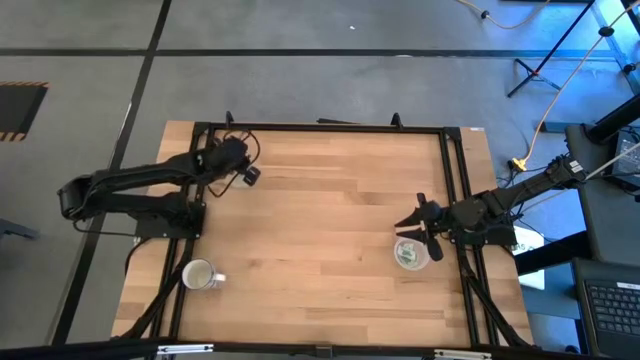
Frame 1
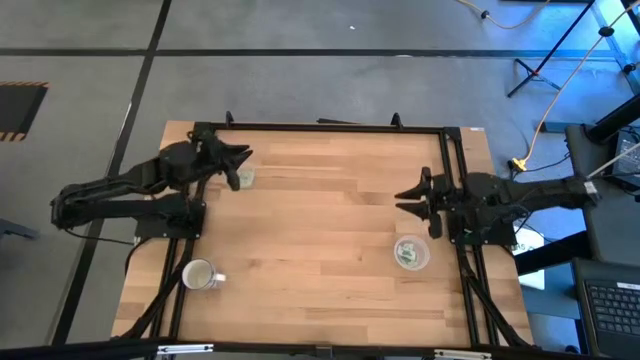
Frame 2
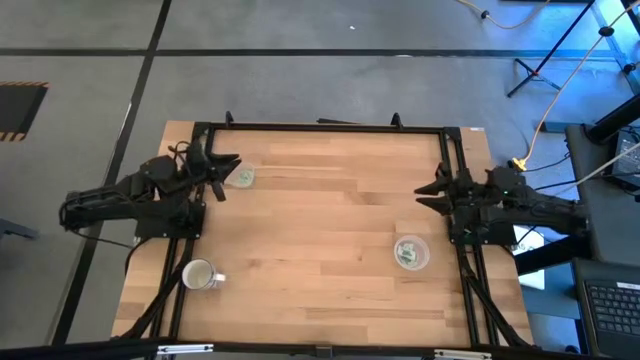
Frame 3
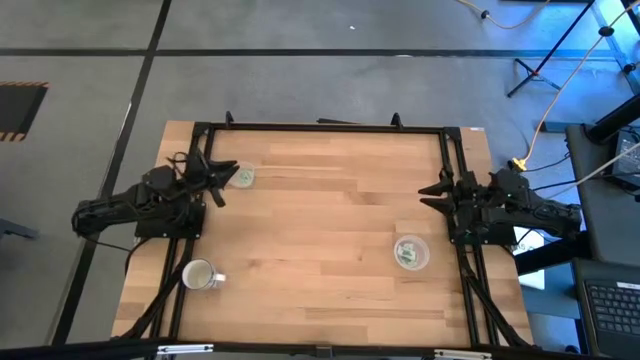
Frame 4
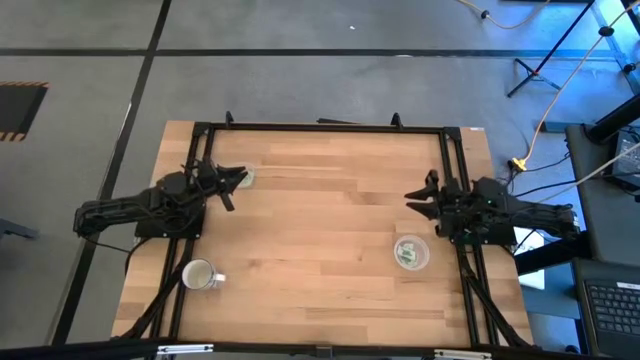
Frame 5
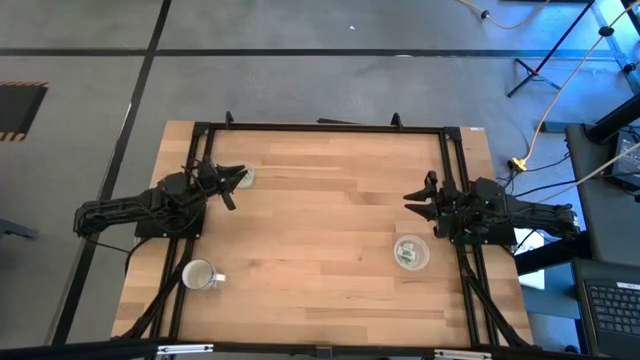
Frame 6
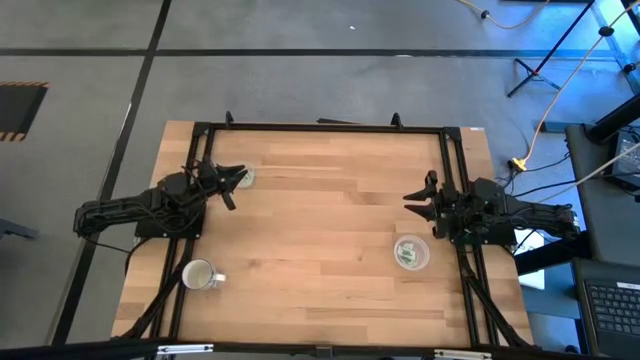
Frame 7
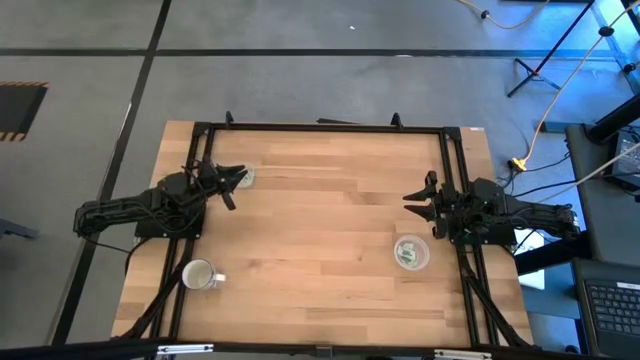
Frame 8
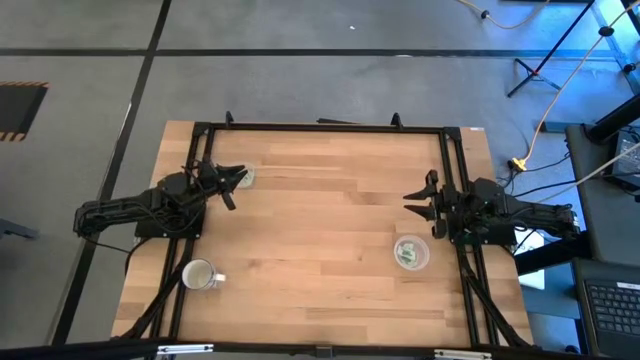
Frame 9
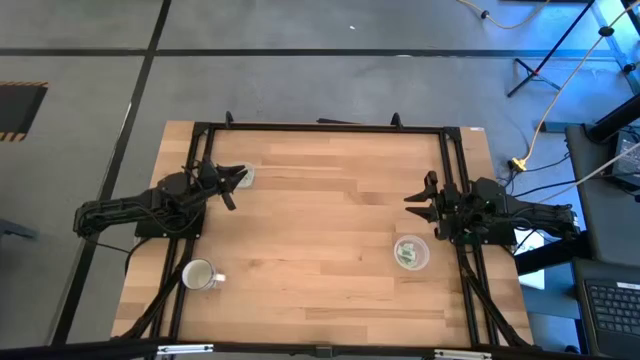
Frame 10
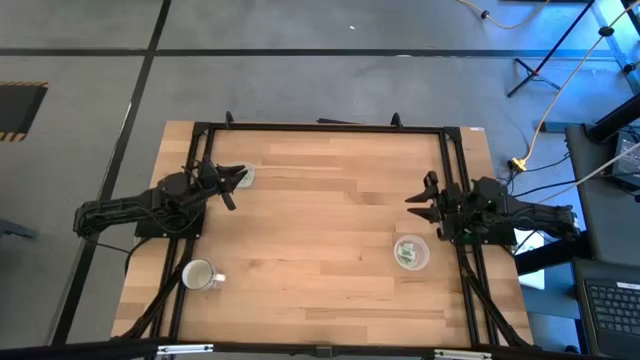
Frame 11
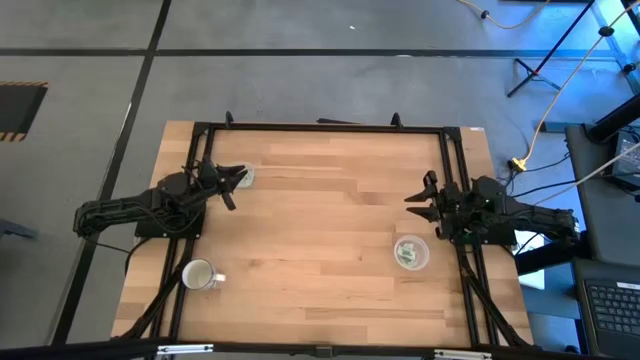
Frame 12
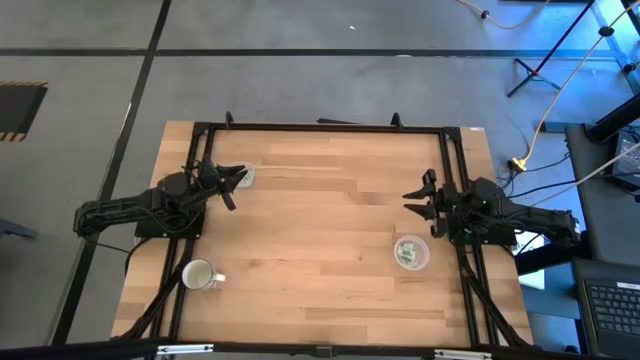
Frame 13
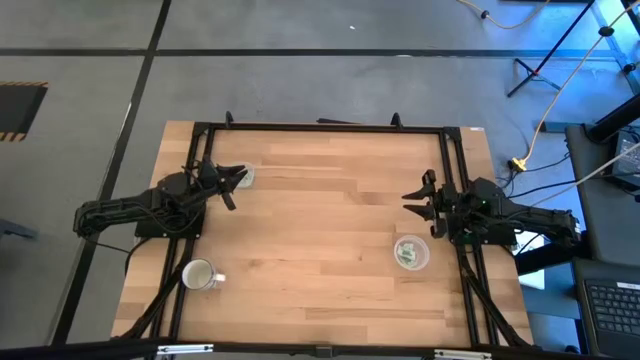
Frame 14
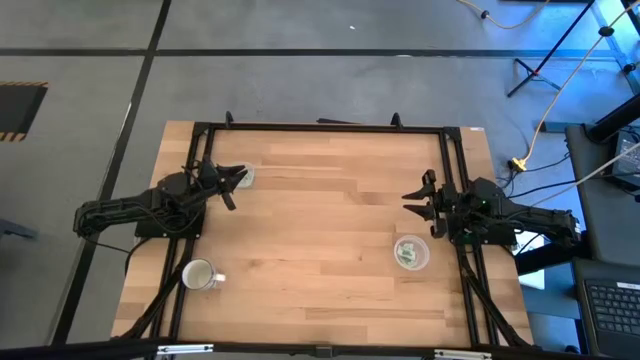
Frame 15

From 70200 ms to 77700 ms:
Task: Pick and place Stevia / Truvia into bins
Return to Home Position

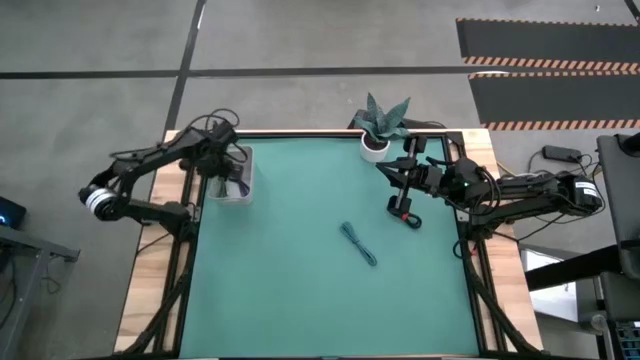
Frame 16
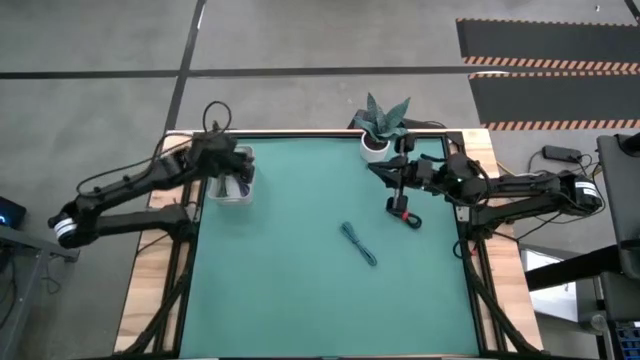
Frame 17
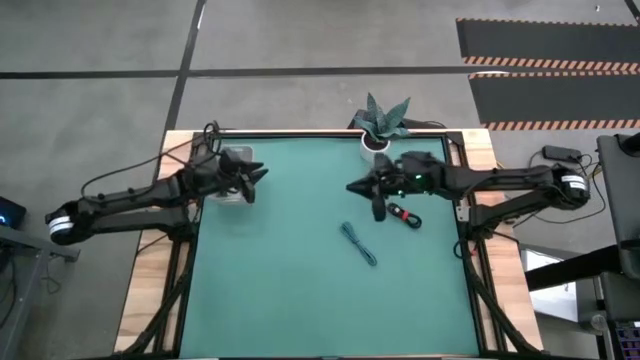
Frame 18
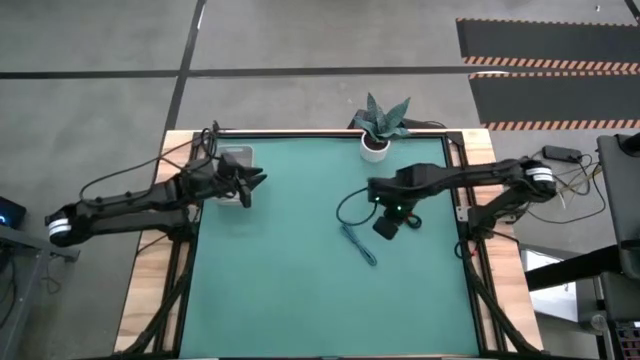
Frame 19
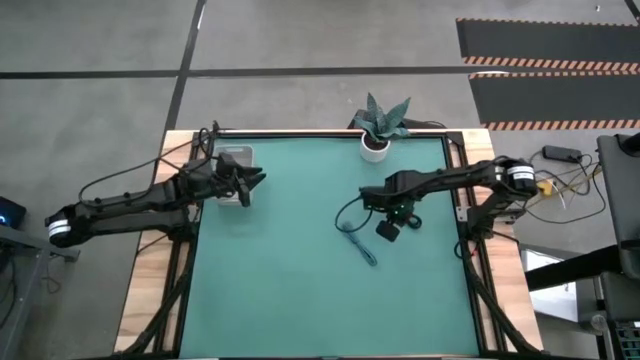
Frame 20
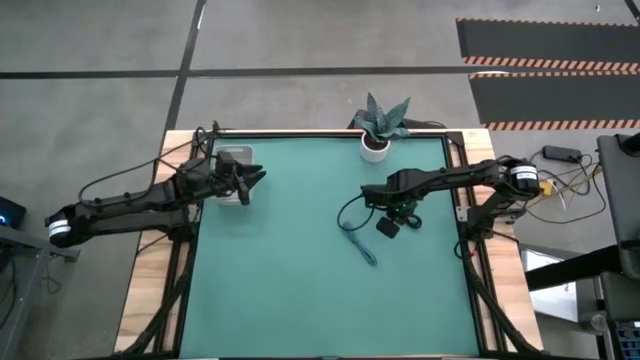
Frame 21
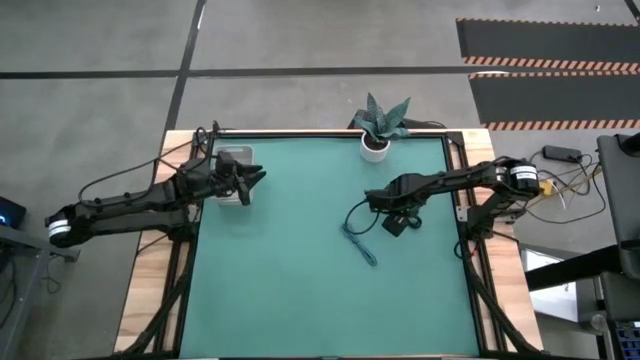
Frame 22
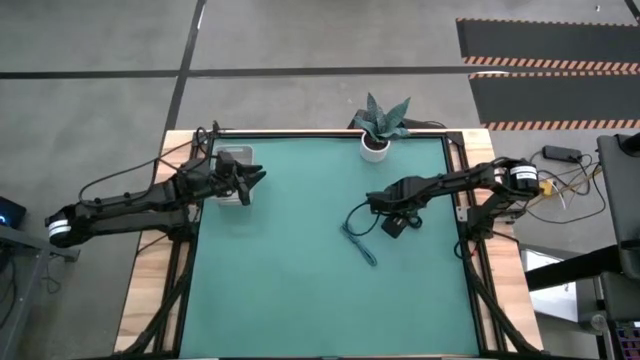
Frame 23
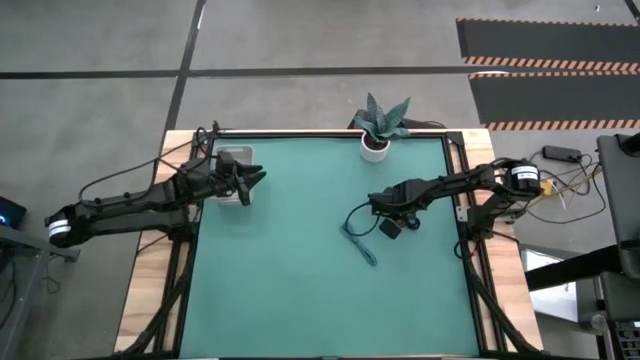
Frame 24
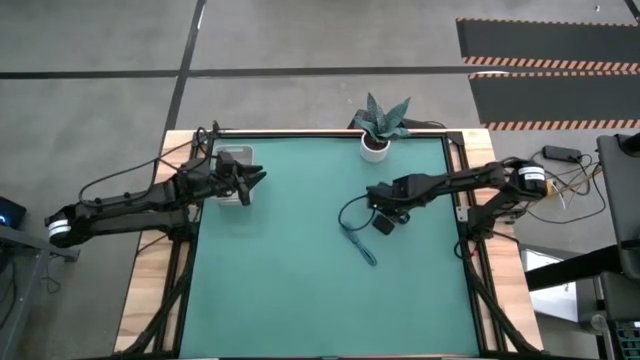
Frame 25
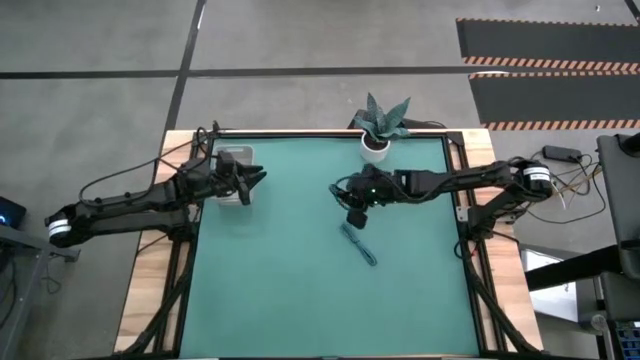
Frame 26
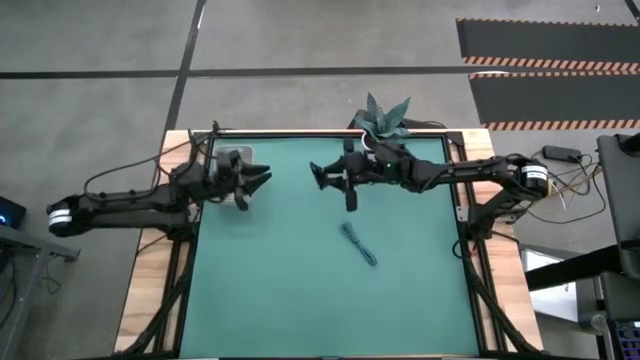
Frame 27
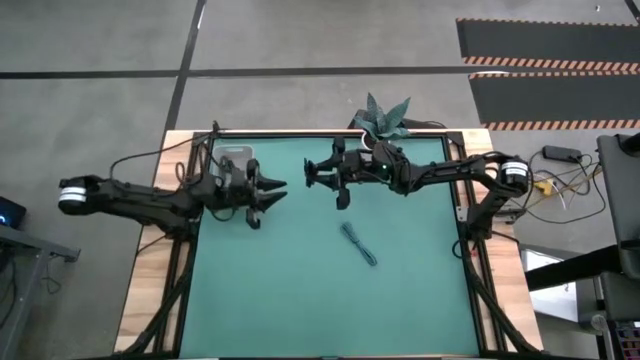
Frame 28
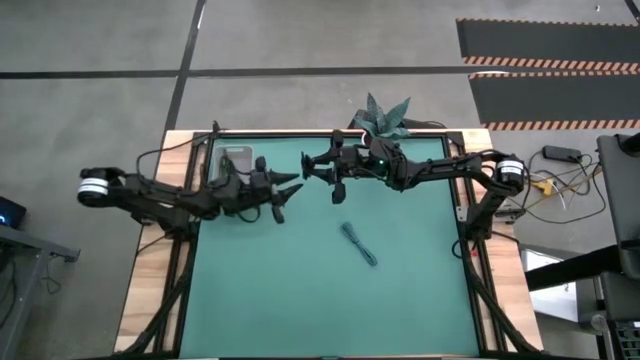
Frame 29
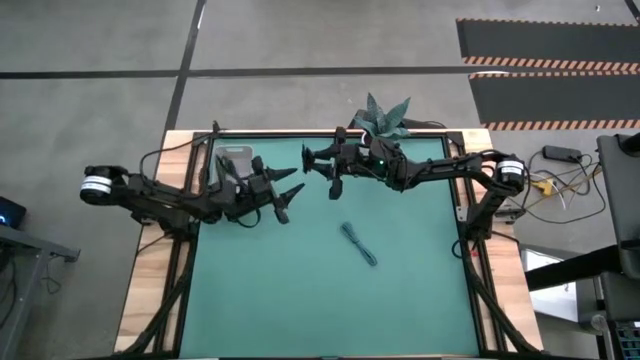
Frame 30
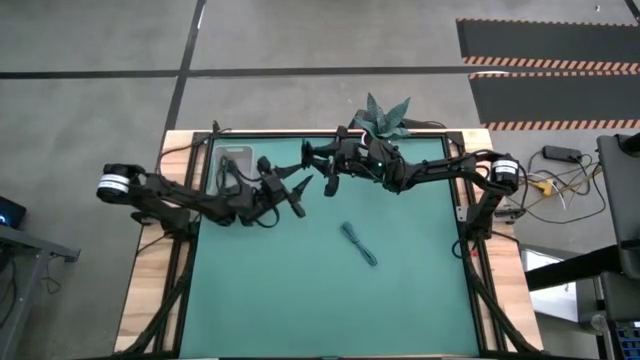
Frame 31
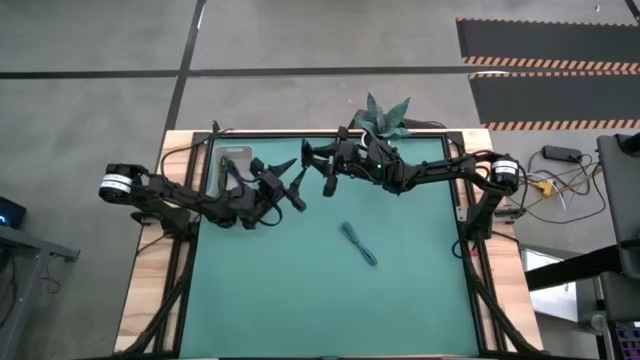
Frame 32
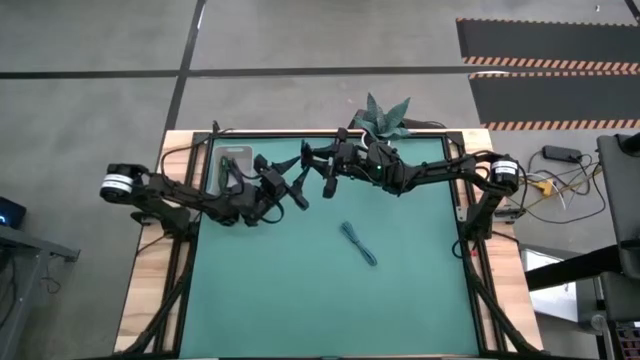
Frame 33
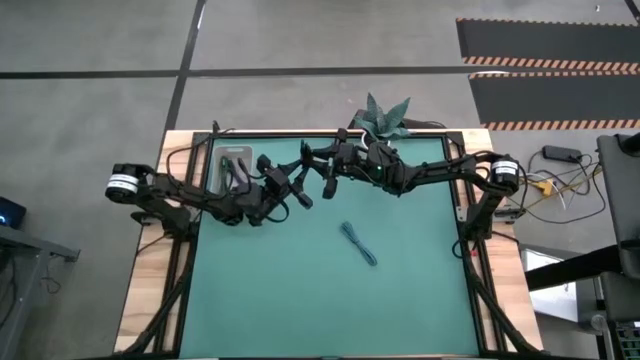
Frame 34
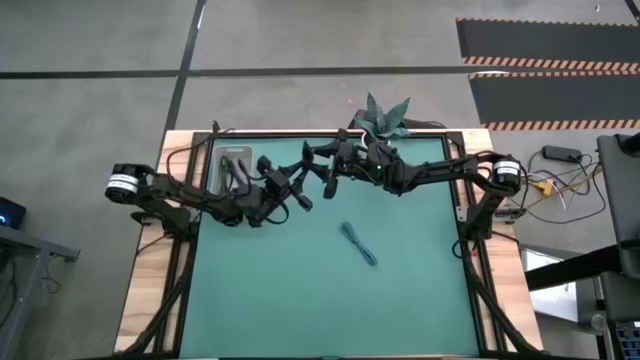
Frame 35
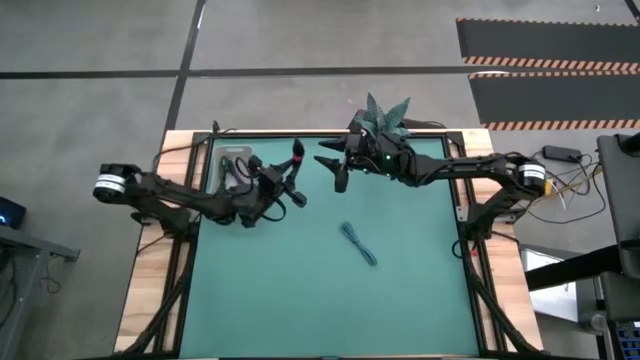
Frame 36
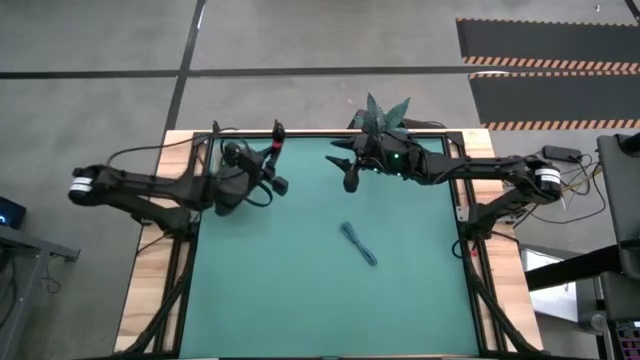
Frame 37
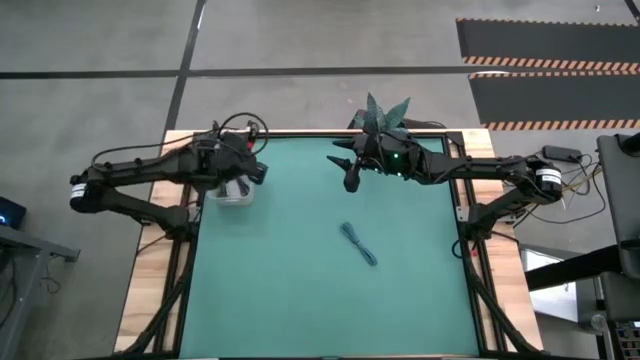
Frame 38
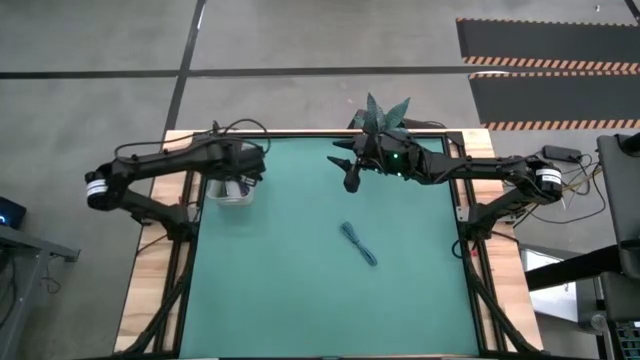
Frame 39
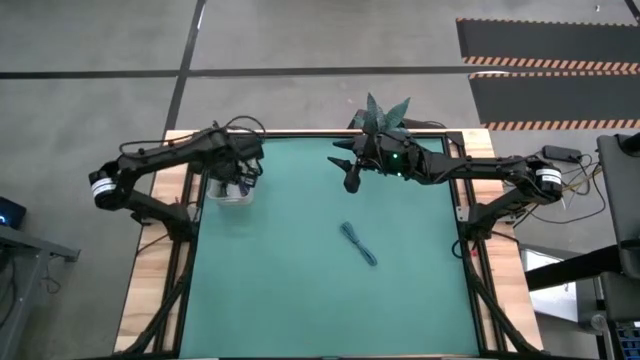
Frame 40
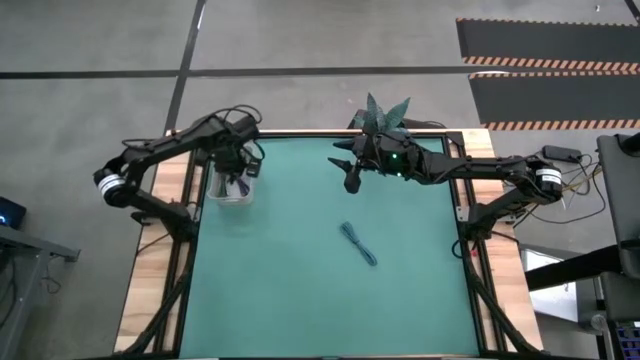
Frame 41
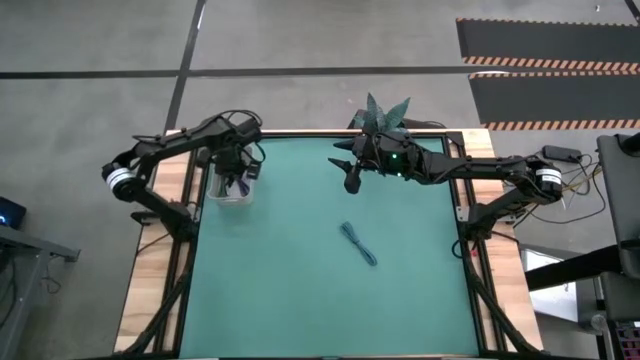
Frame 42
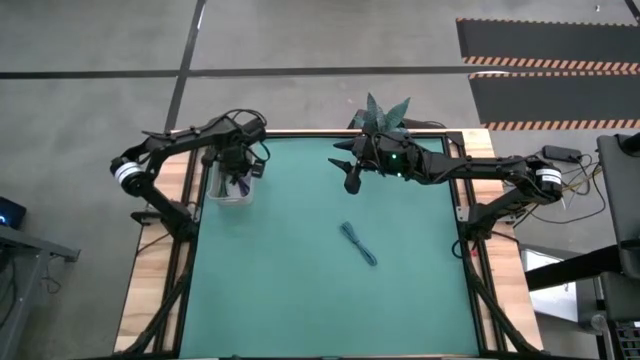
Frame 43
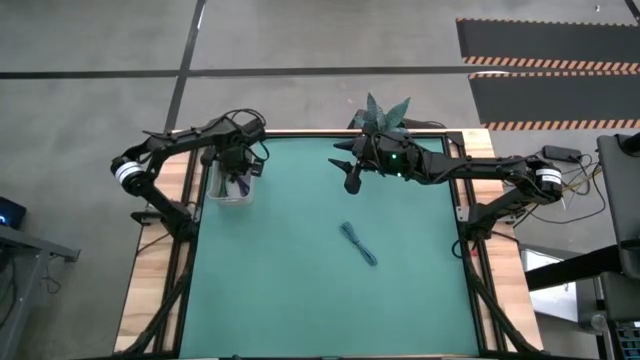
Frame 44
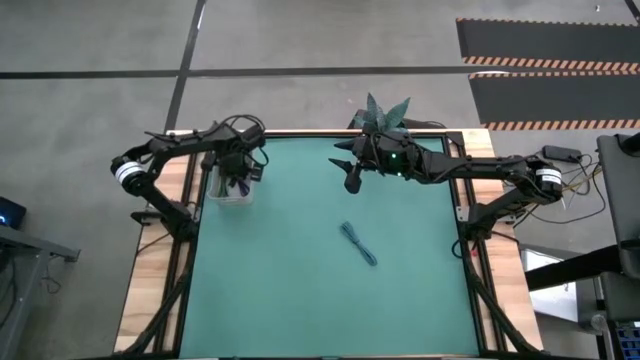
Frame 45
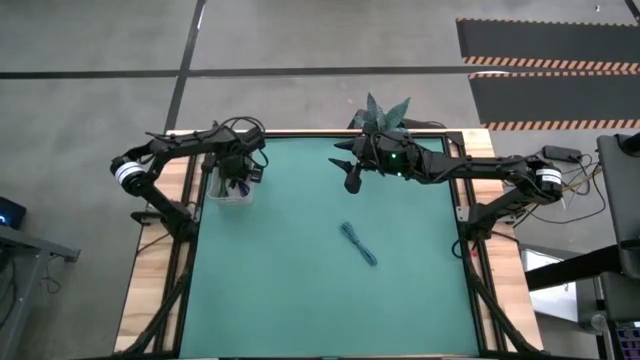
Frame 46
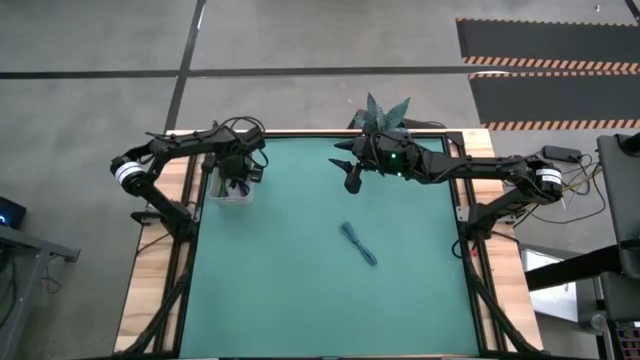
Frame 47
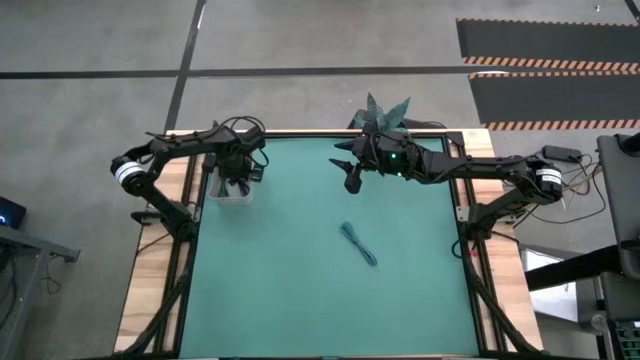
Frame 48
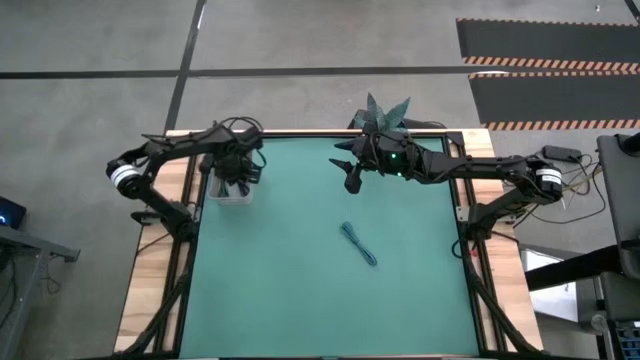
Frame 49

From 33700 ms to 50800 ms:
Task: Pick and place USB-C Cables
Put the black usb cable into the gray bin
